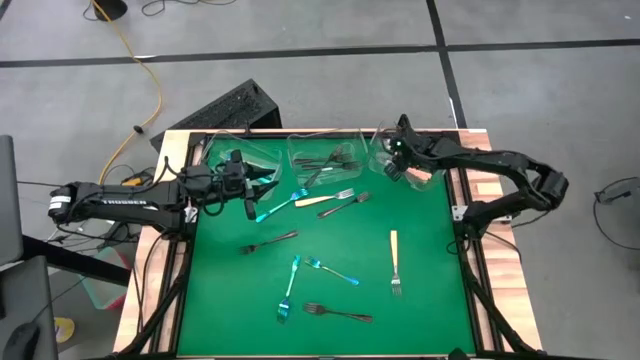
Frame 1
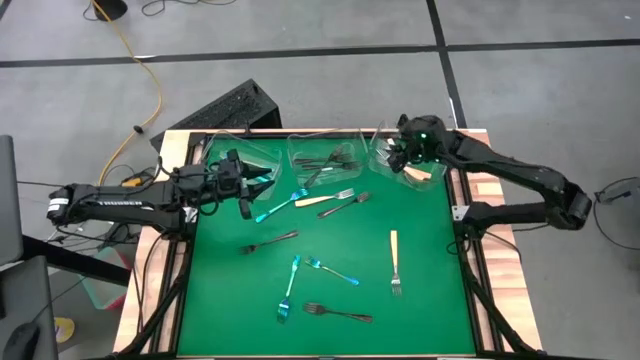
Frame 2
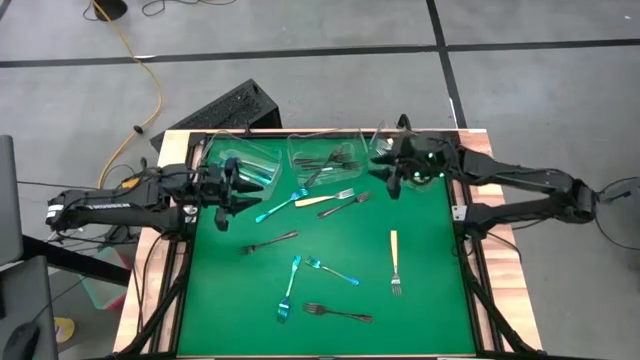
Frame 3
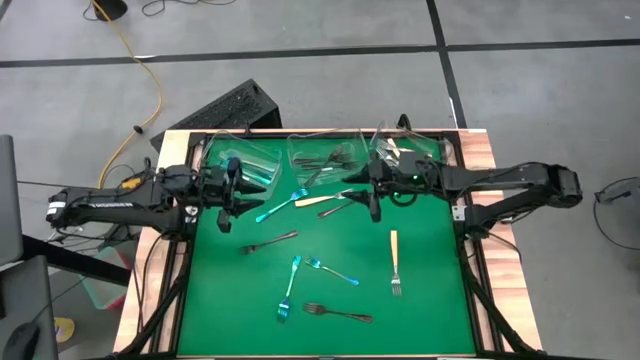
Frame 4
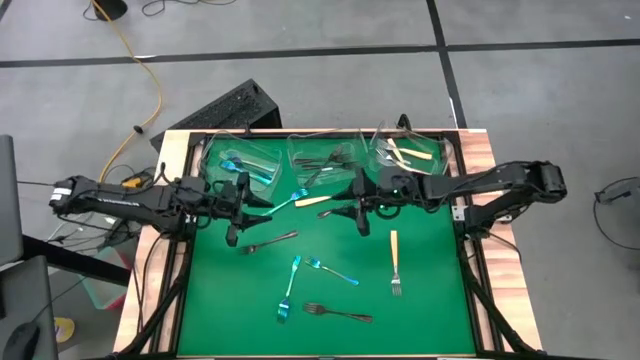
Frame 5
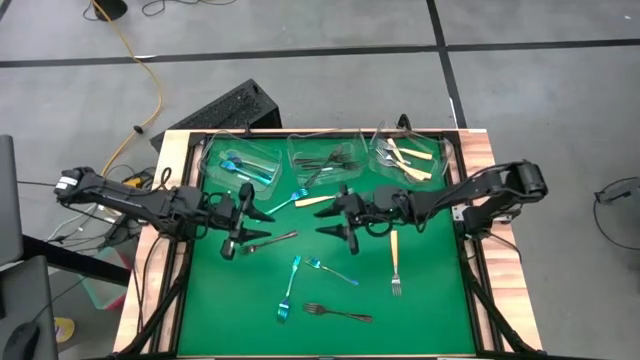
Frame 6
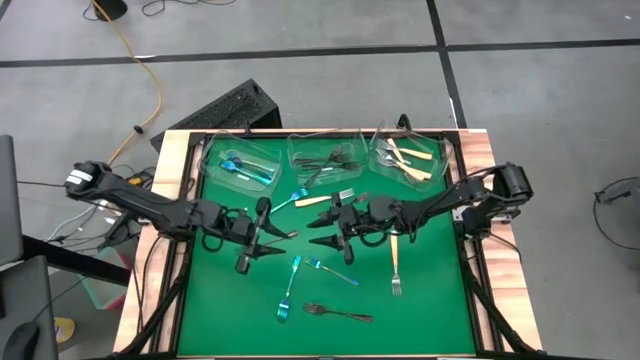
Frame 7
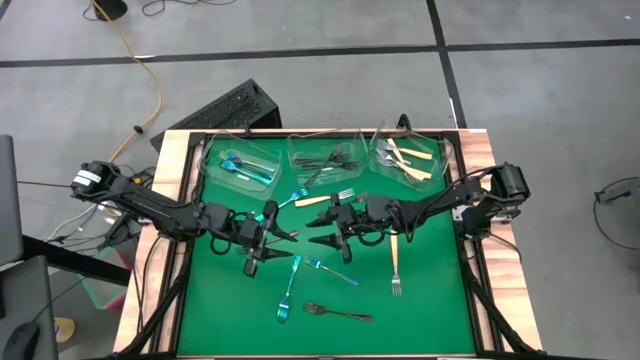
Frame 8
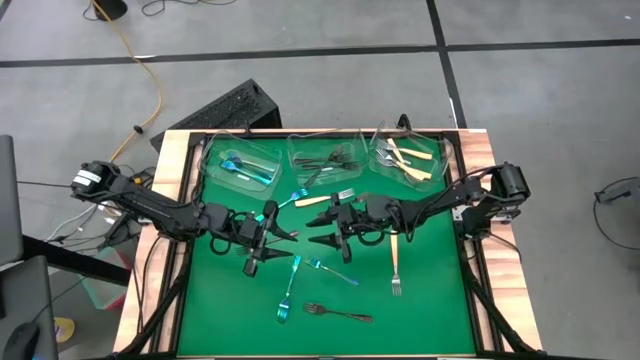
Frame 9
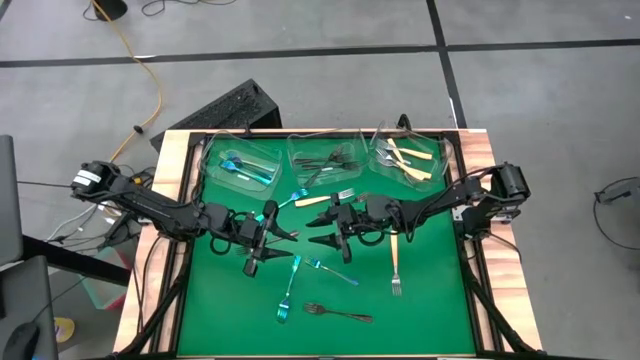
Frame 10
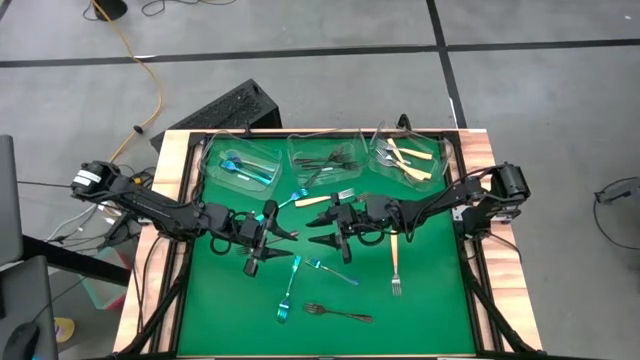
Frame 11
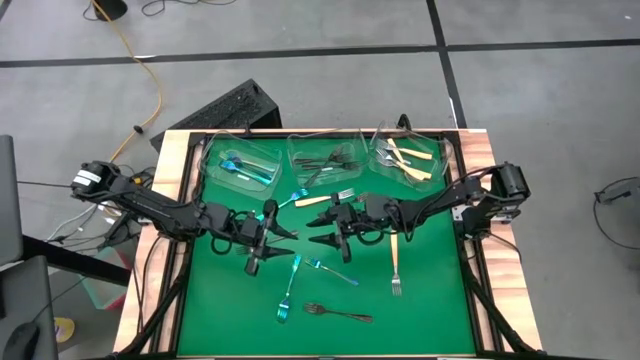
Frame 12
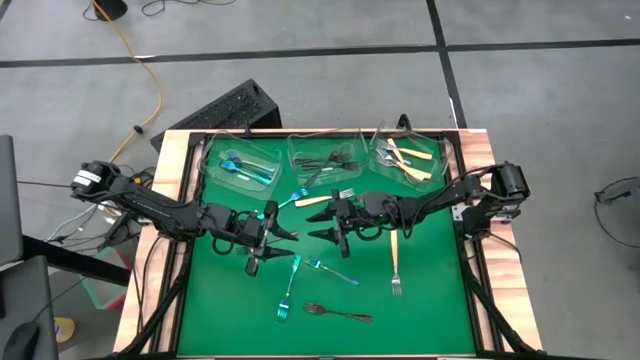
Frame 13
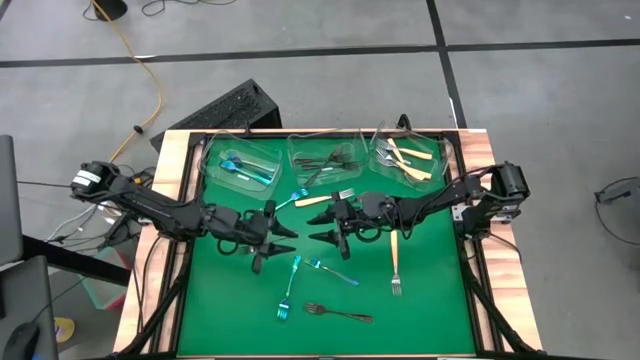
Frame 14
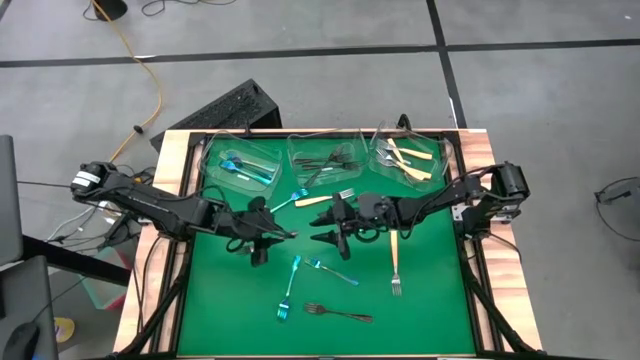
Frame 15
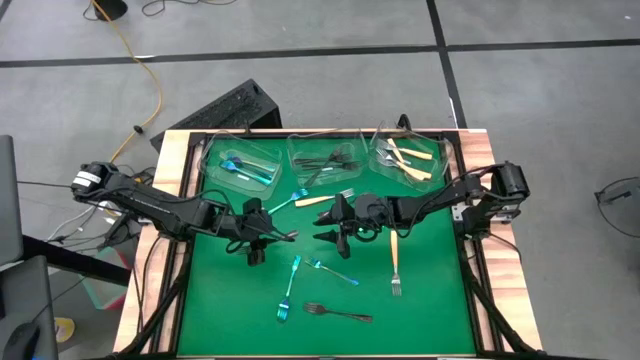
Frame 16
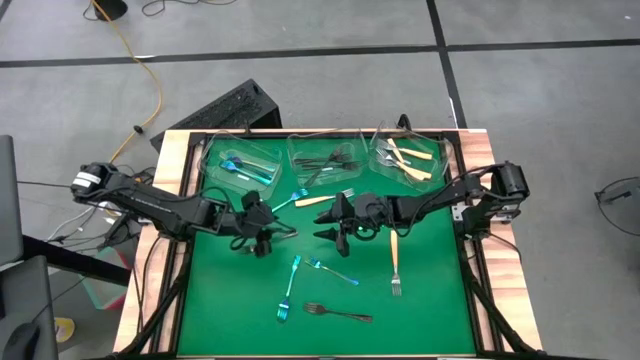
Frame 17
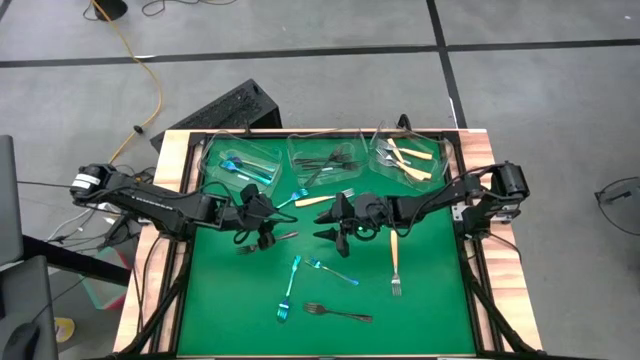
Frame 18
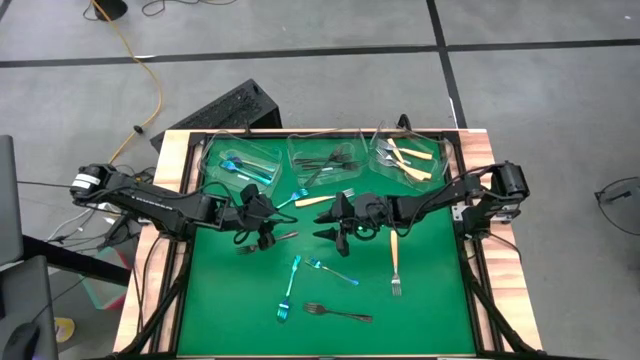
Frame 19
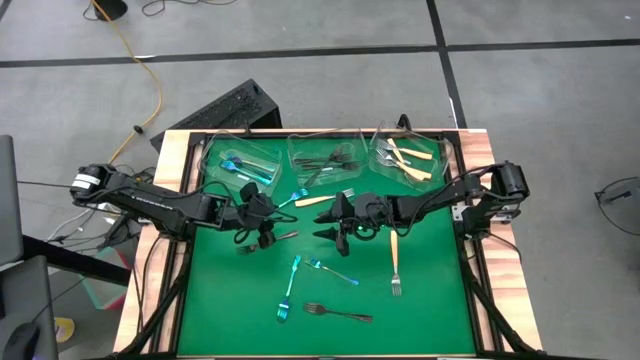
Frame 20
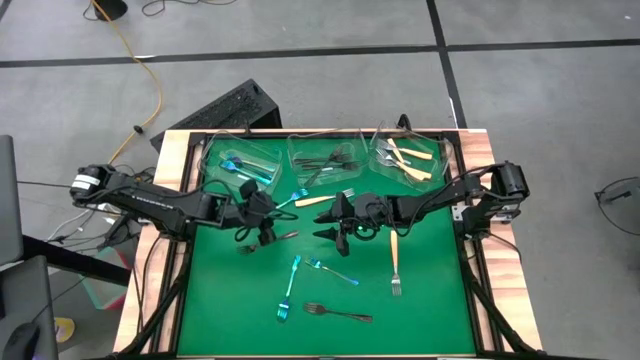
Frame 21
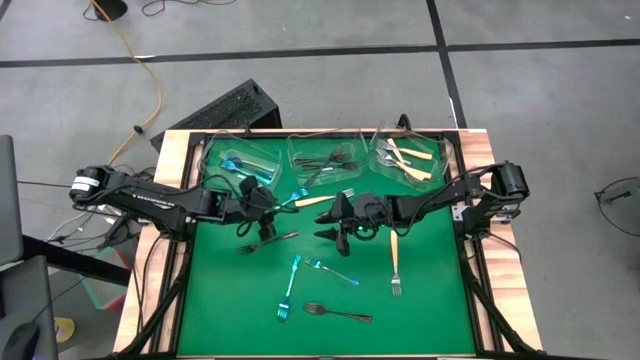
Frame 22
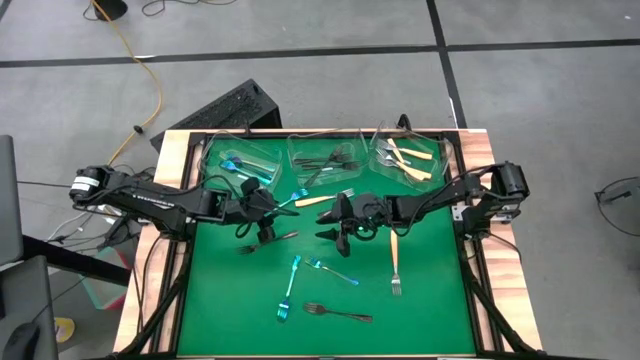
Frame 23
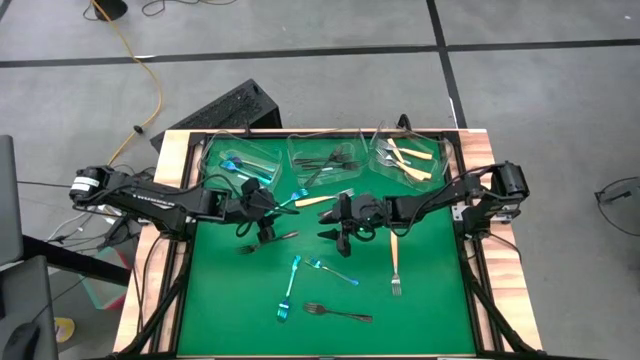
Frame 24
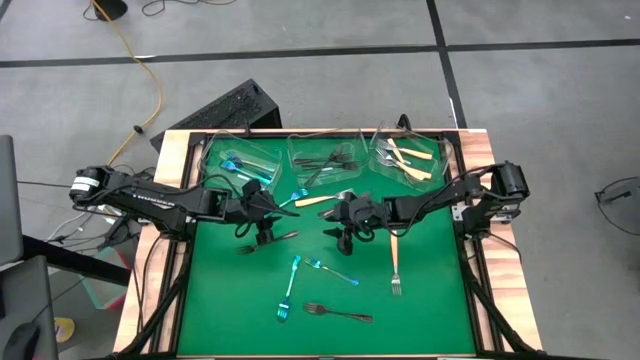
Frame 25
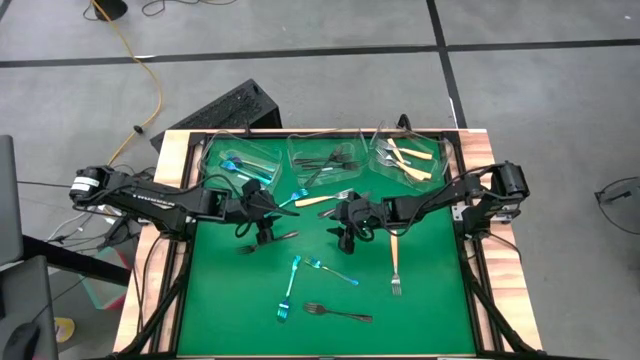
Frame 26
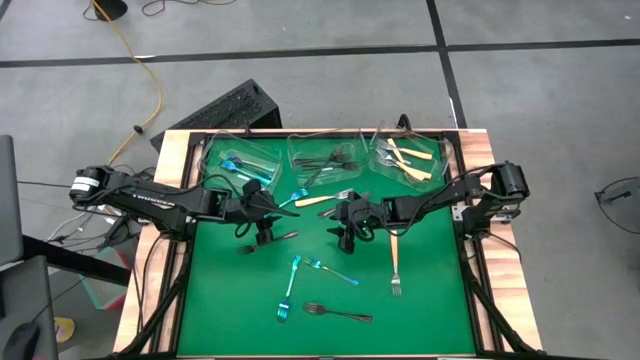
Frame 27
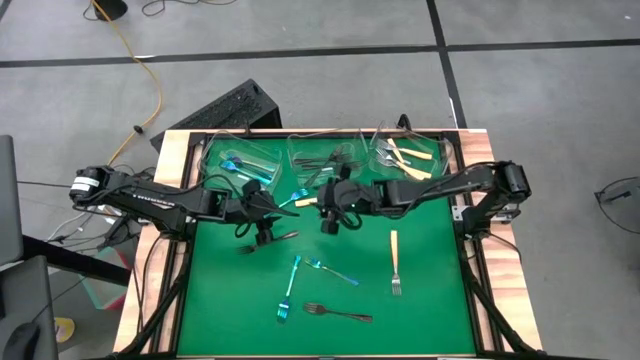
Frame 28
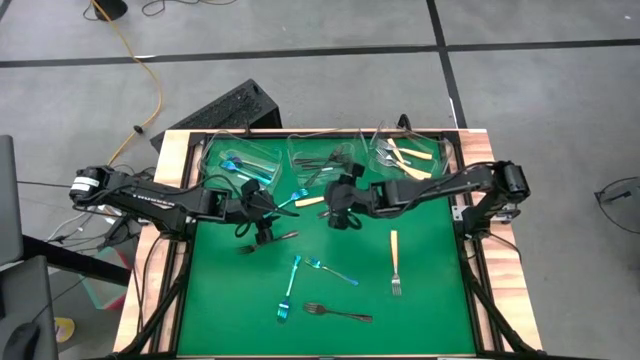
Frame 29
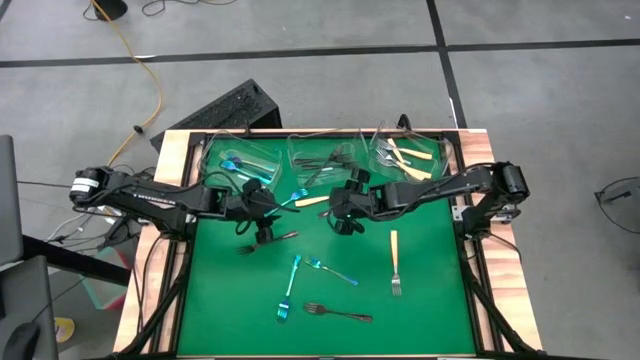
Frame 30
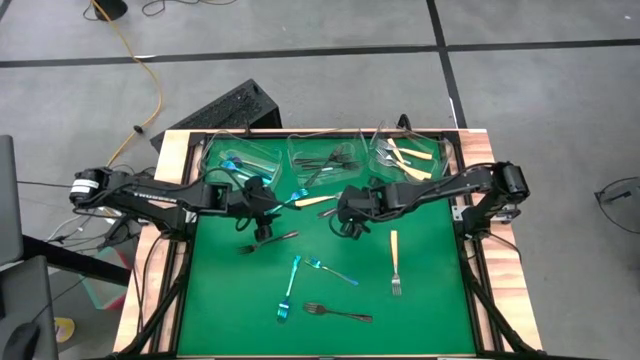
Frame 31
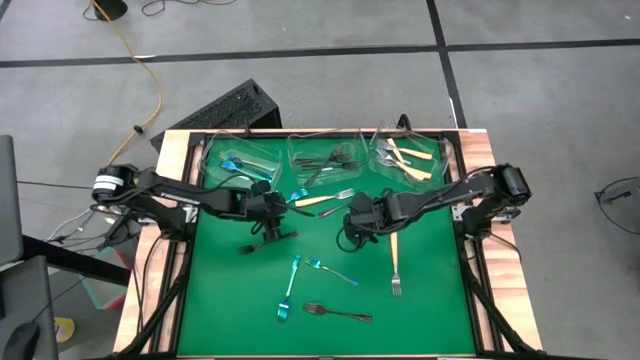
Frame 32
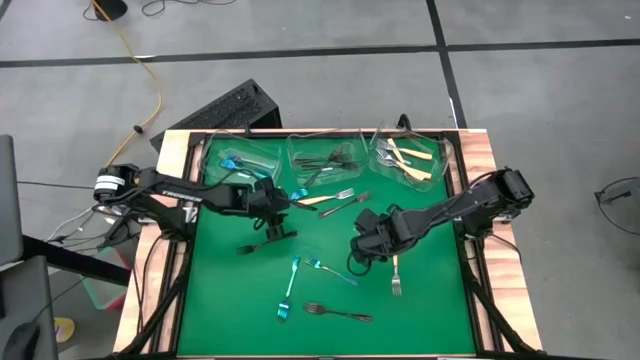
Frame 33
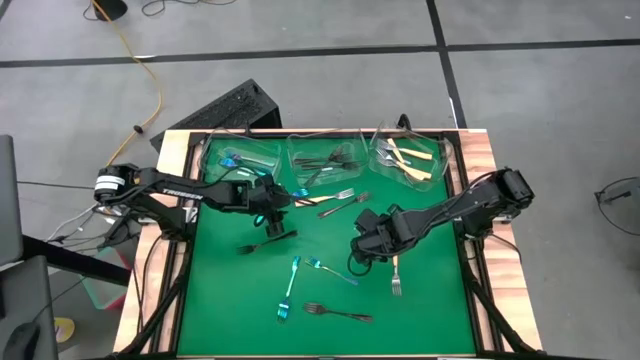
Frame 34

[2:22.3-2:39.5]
Task: Sort silverware by color (type)
Put the blue fork into the left transparent bin

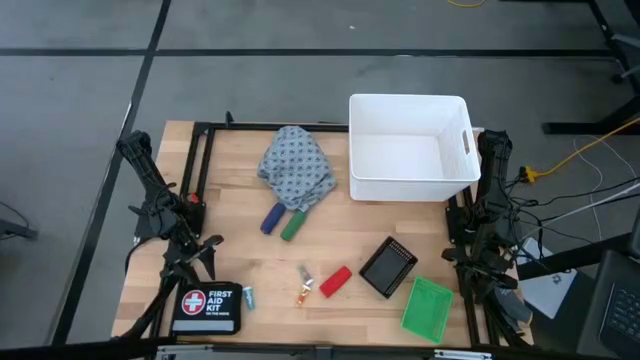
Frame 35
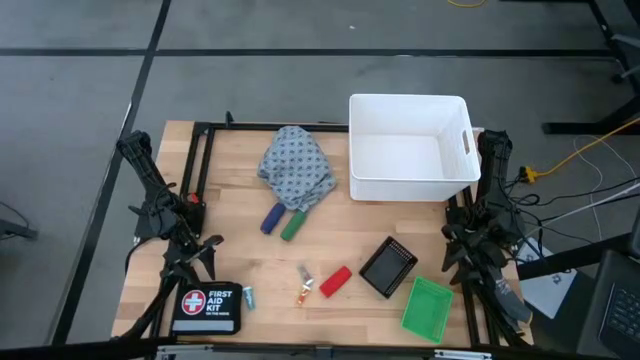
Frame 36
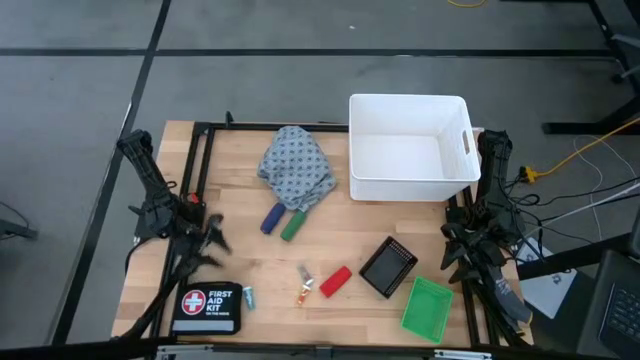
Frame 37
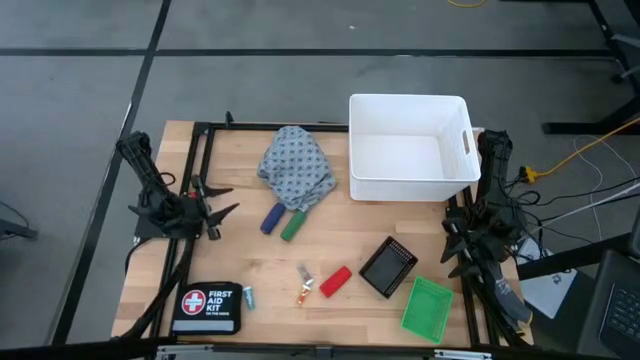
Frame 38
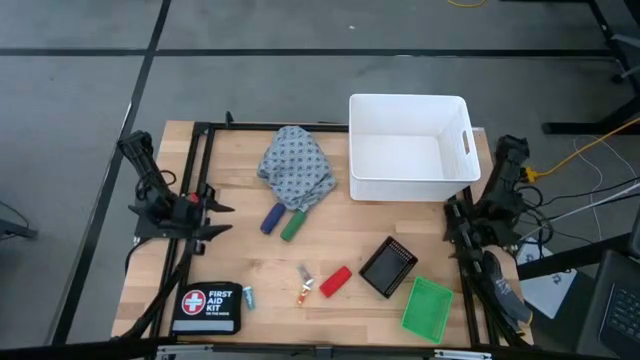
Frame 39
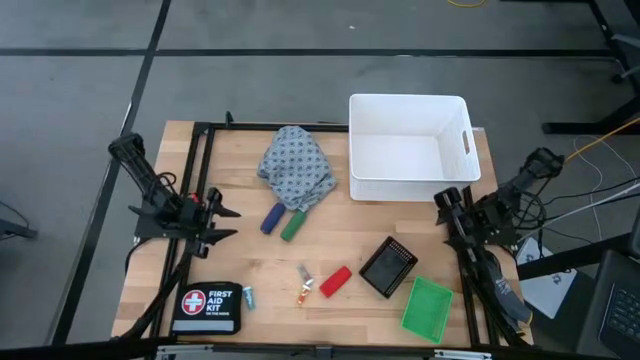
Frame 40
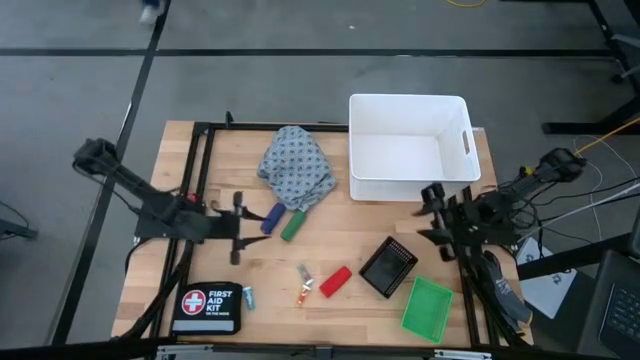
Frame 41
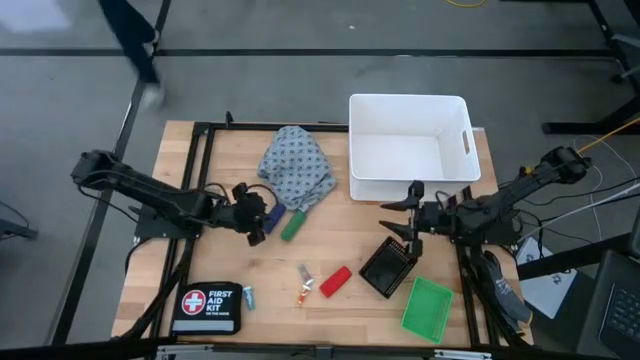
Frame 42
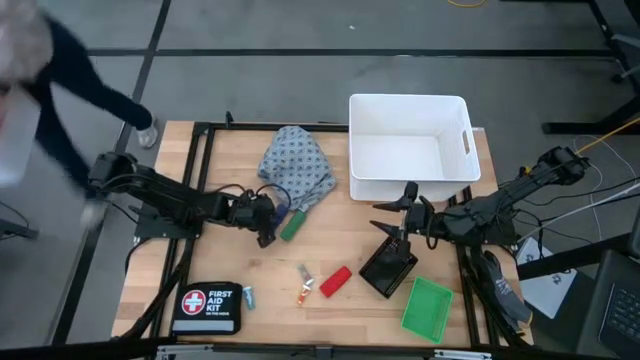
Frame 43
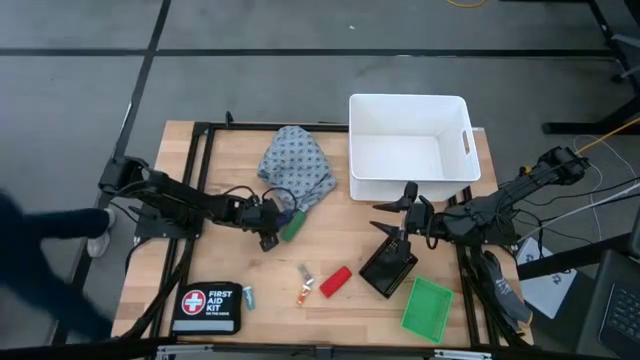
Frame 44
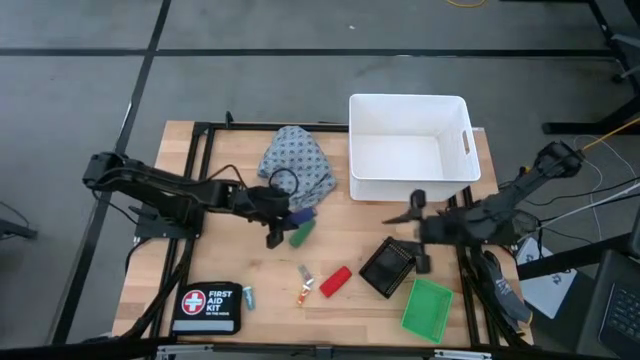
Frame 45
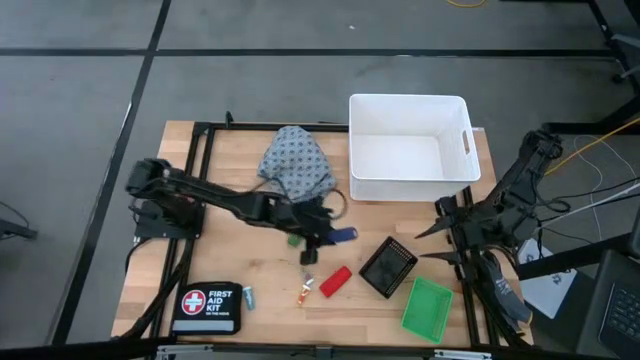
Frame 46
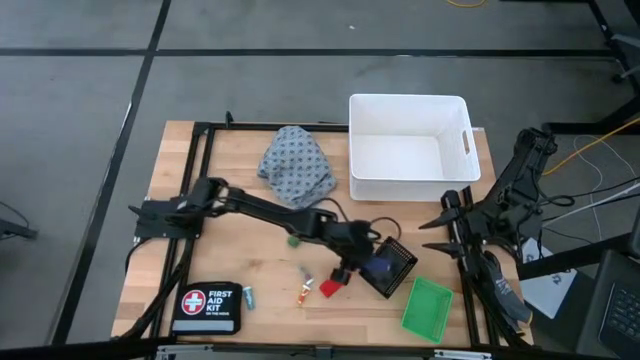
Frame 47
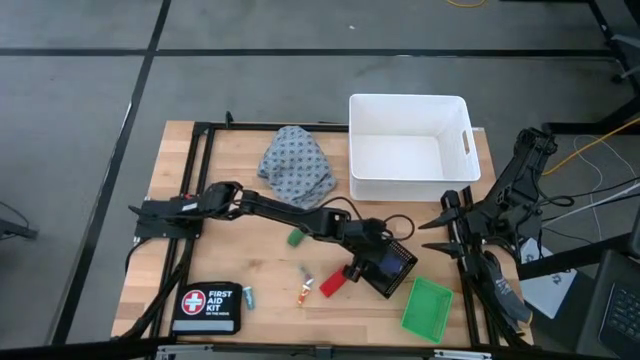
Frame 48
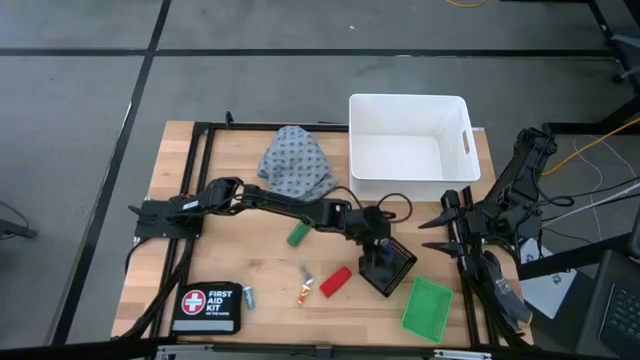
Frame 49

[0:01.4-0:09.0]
Task: Pick & Place Medicine items
Put the blue bandage into the black bin
